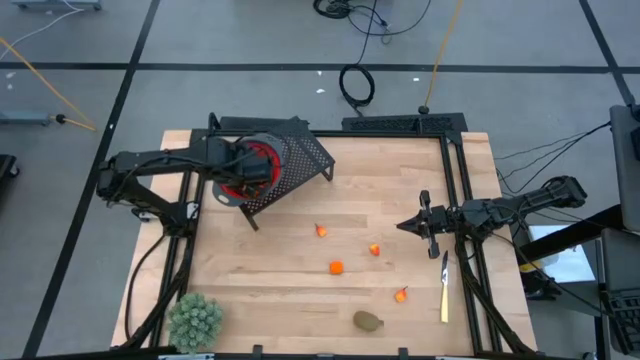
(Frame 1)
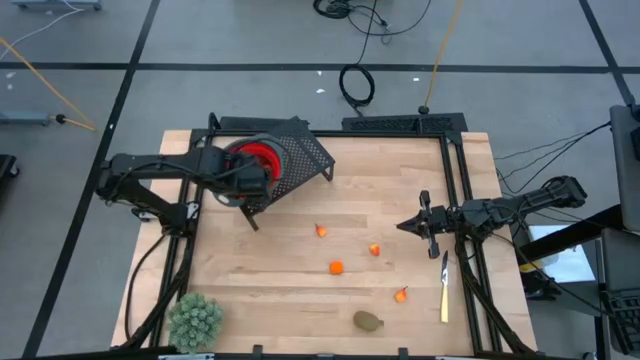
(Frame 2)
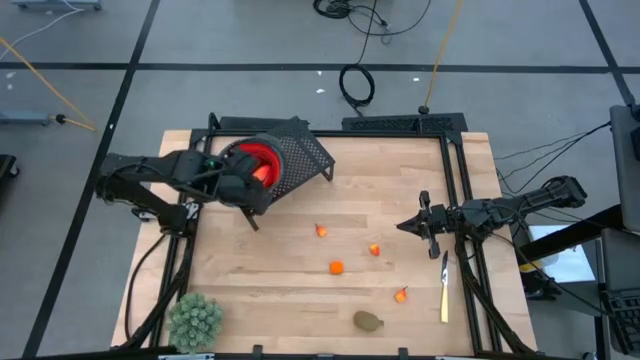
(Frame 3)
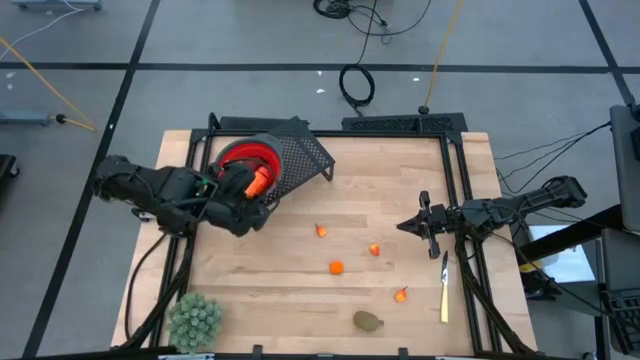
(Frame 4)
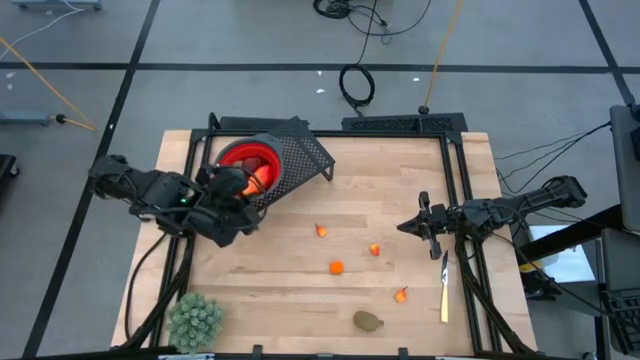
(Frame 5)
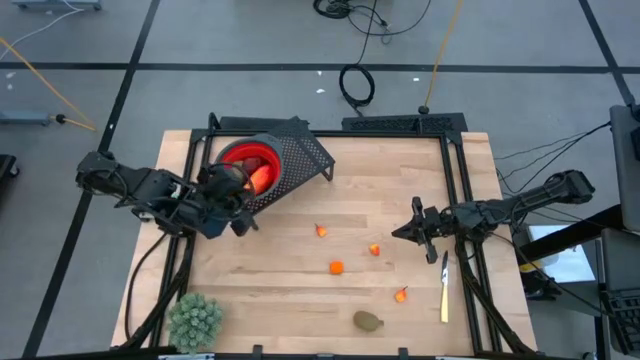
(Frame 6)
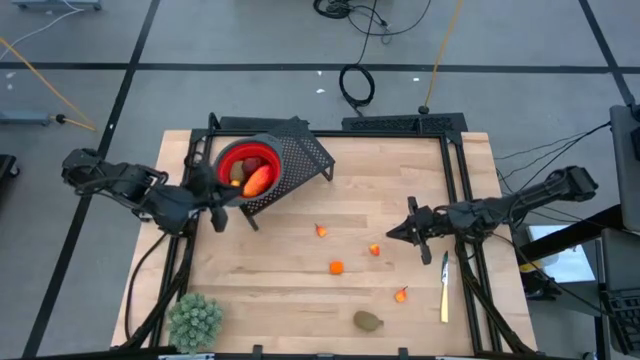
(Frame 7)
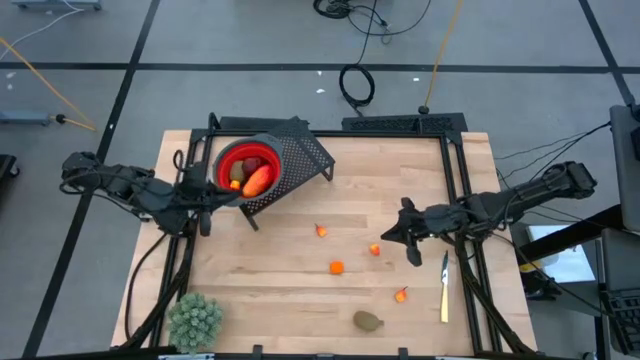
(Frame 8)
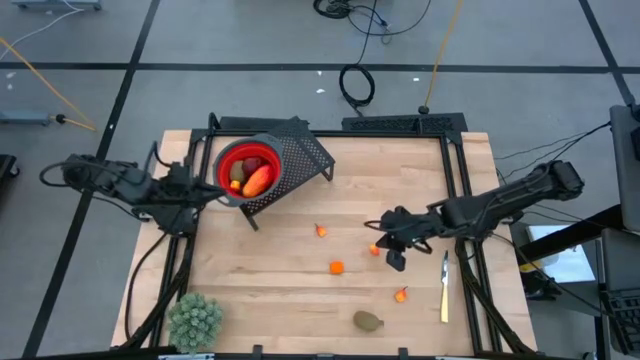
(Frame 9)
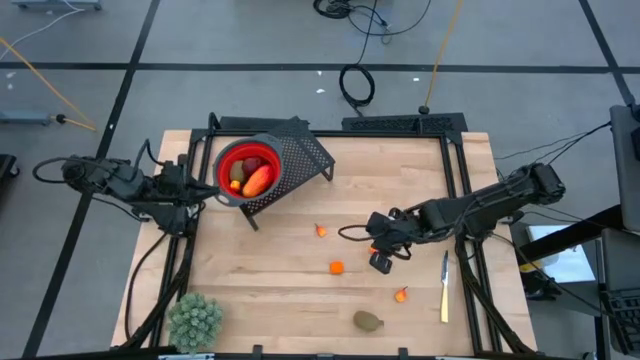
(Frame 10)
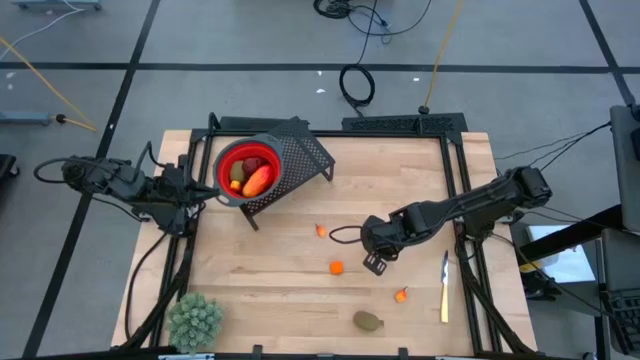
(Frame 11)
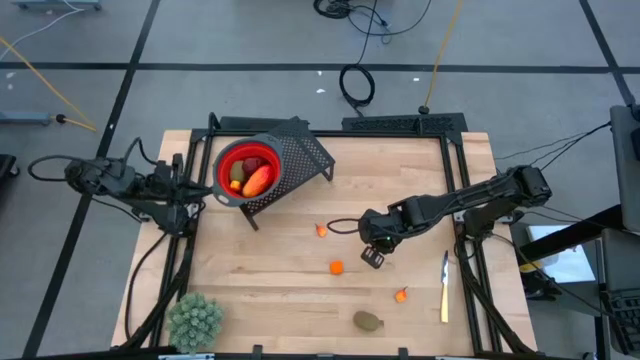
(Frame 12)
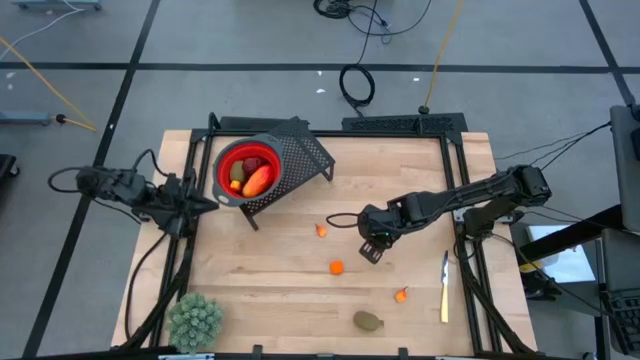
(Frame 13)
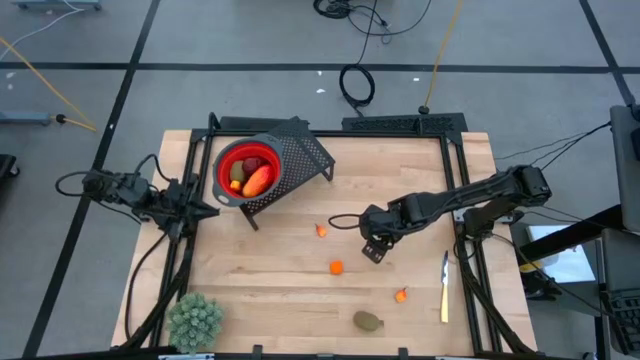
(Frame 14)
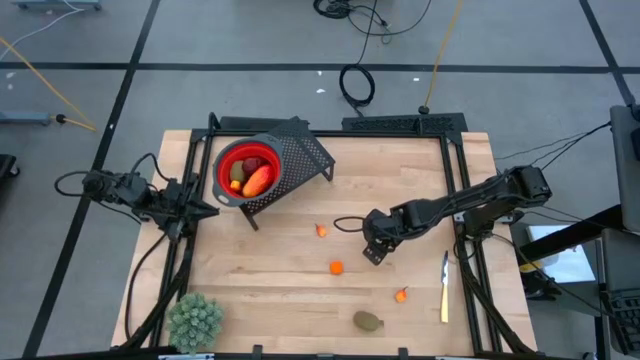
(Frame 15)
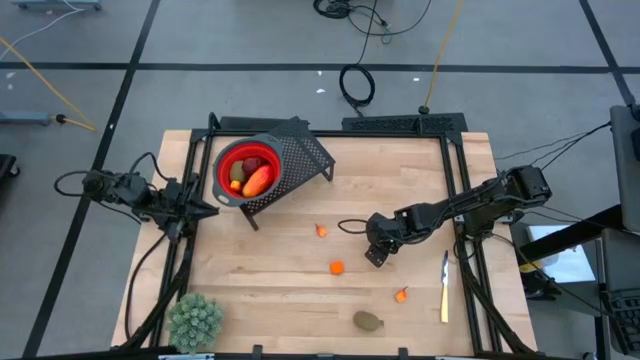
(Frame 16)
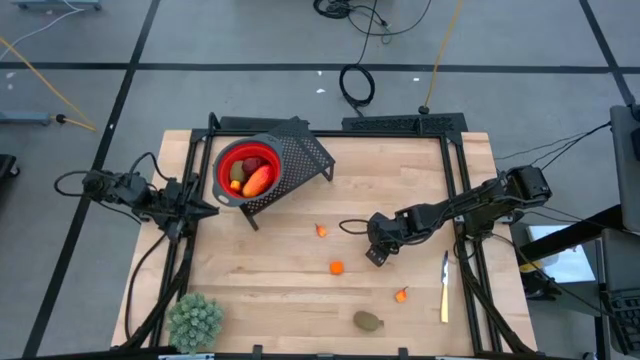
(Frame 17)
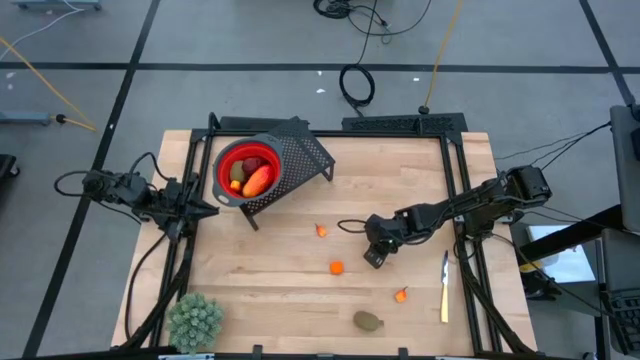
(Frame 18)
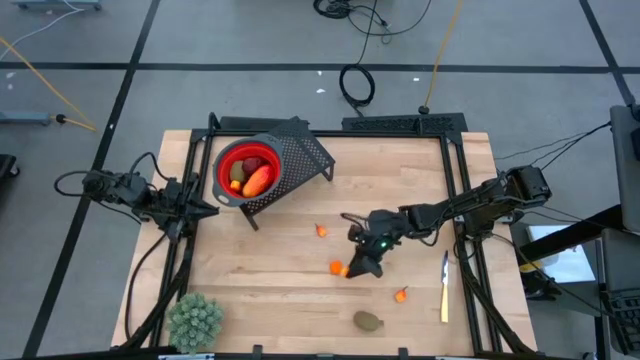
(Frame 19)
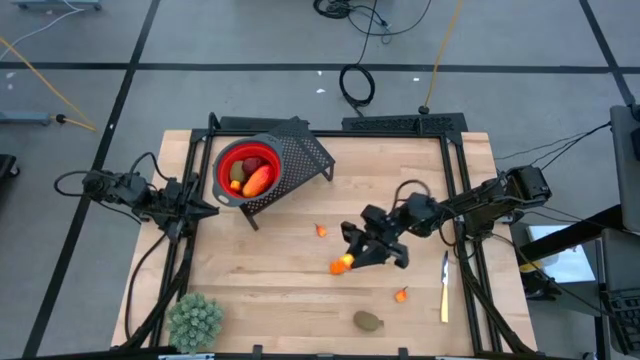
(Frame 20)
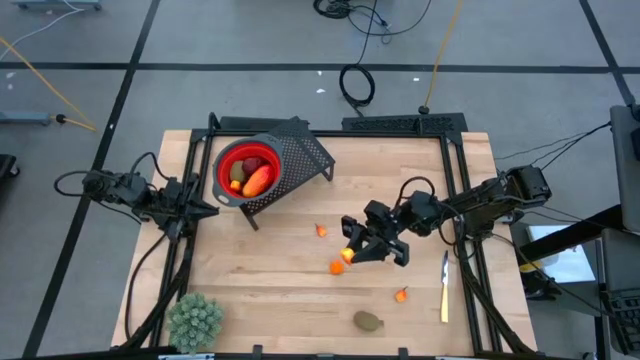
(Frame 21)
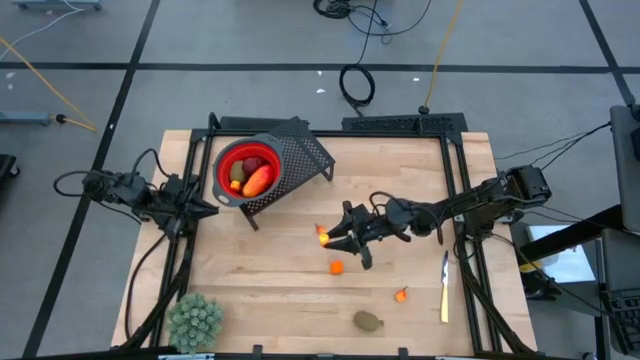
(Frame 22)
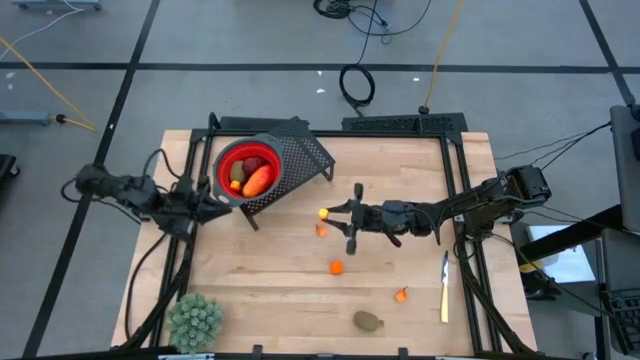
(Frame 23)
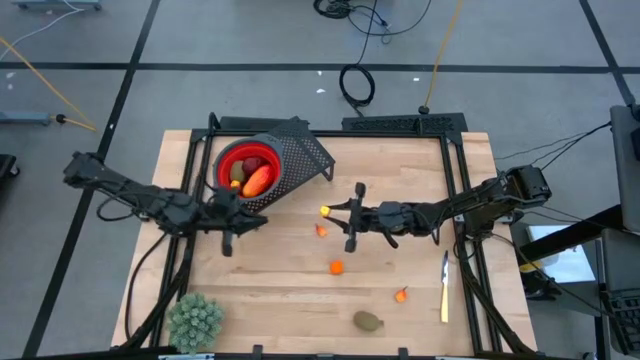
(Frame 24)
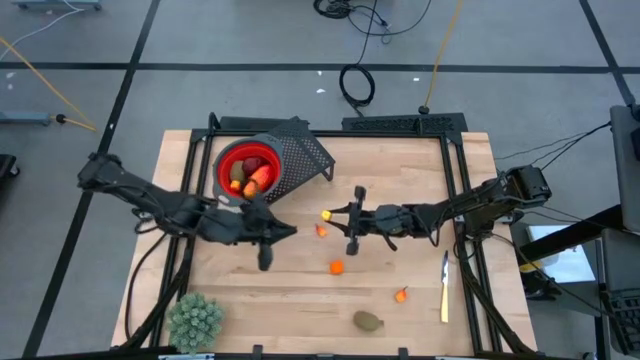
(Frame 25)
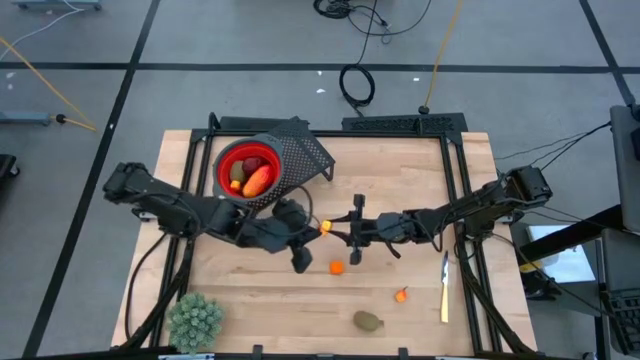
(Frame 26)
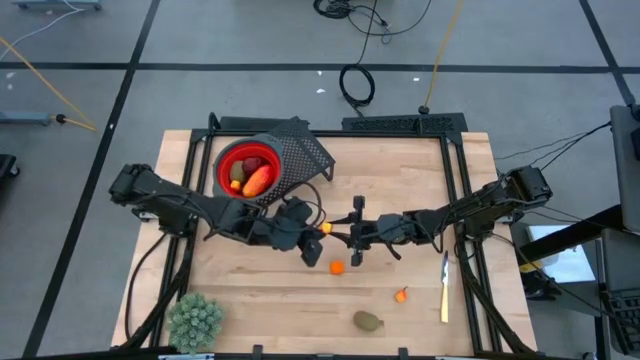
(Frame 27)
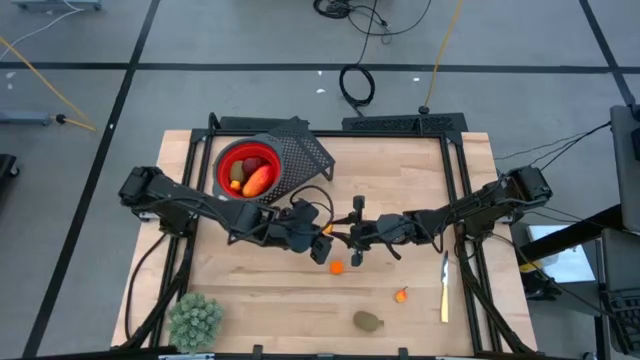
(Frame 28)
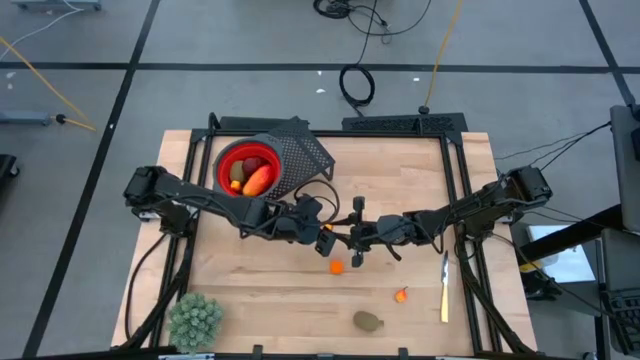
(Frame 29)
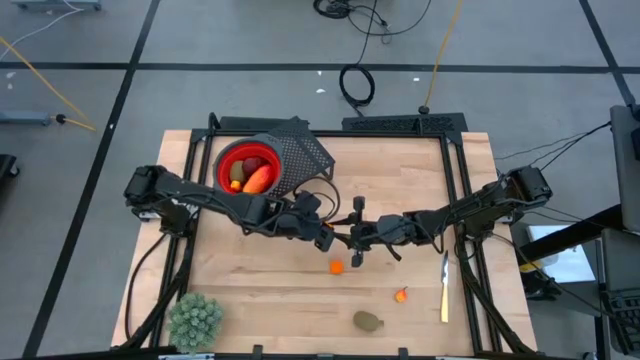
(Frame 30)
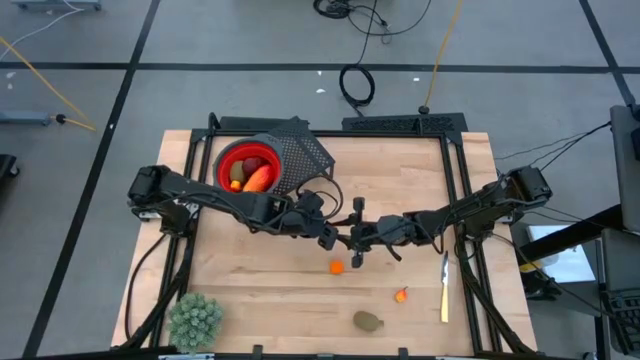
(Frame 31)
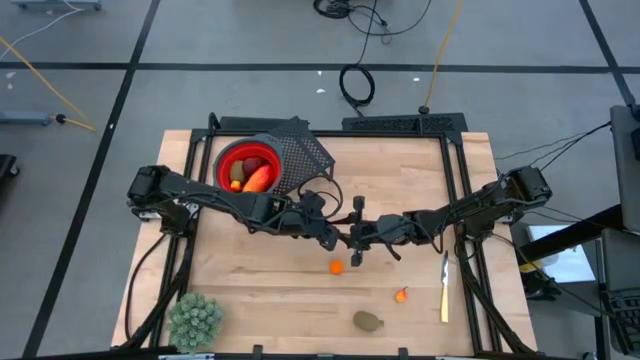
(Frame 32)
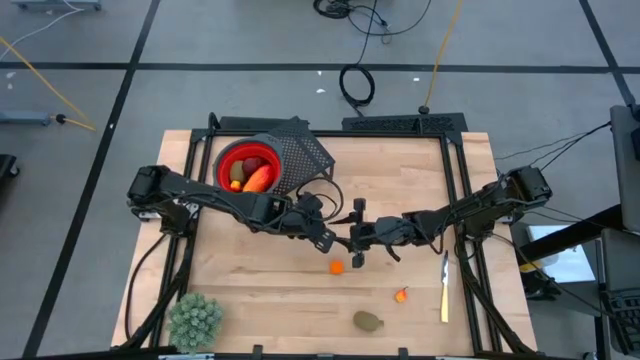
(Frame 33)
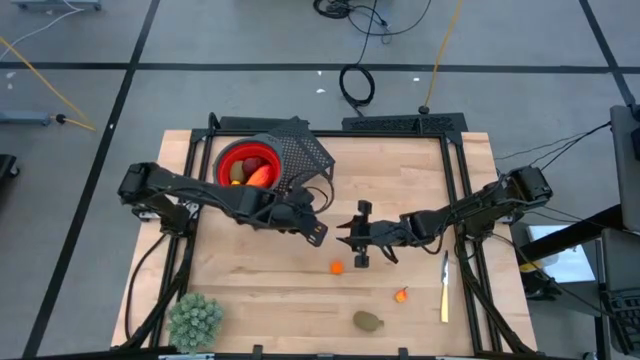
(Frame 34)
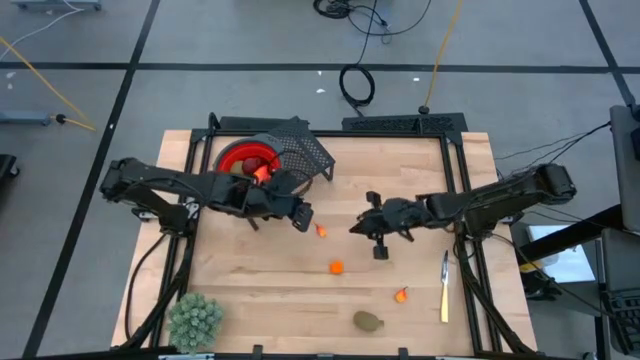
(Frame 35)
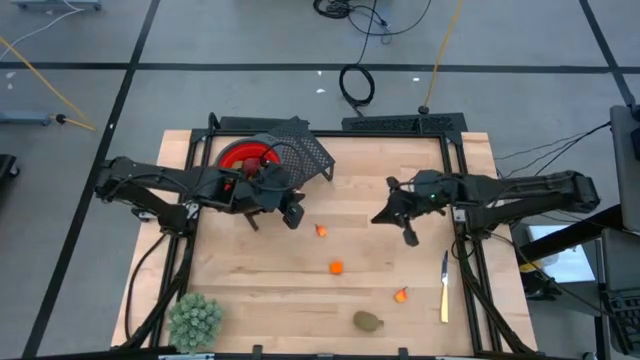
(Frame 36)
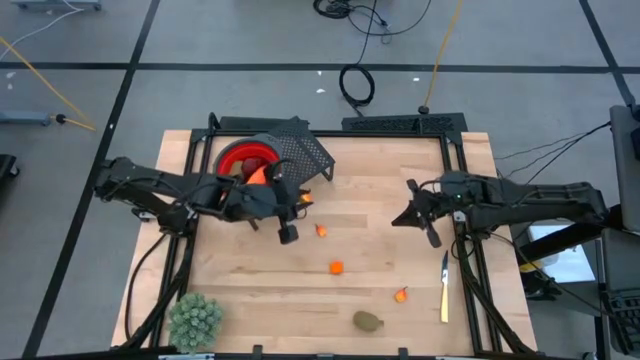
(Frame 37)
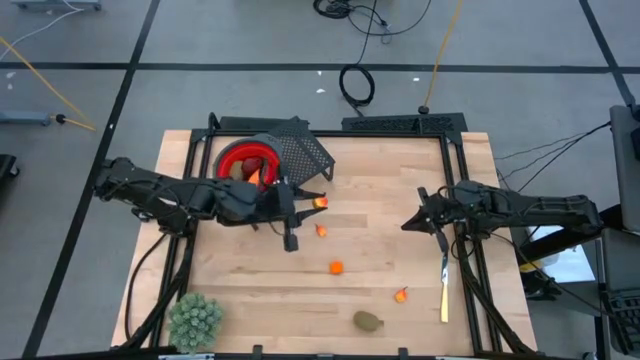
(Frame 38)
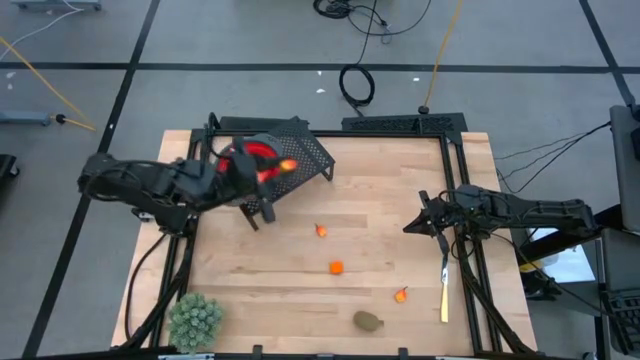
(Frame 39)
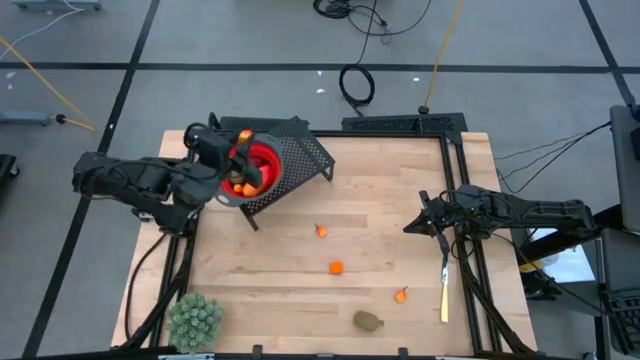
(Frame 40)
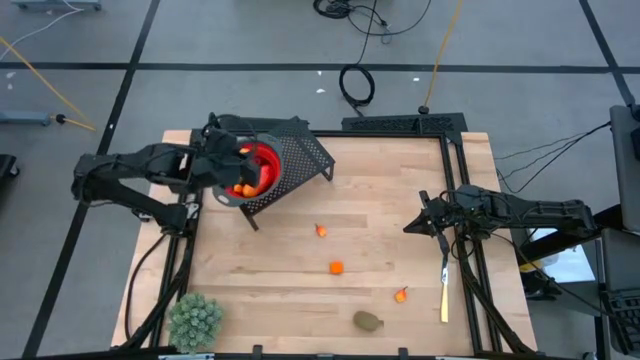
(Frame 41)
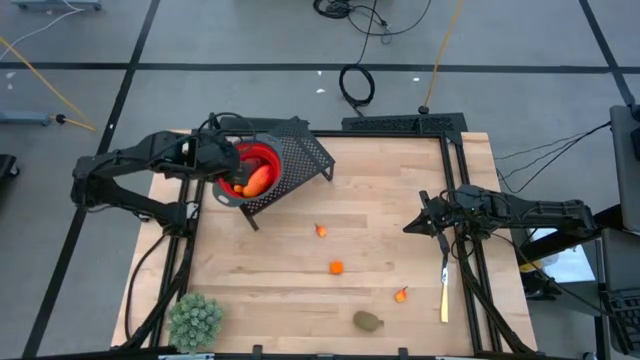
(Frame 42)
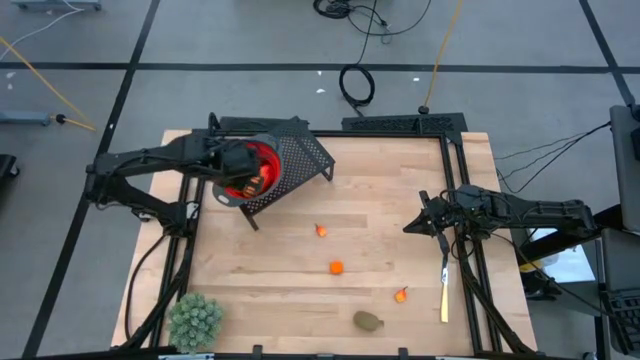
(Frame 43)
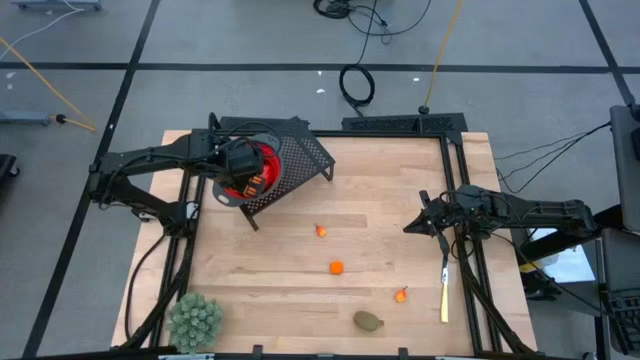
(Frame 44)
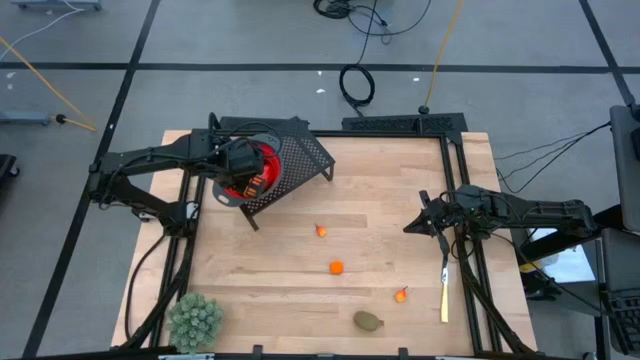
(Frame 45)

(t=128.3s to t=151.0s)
Task: Pick & Place Fruit
Put the peach into the red strainer bowl on the shelf
